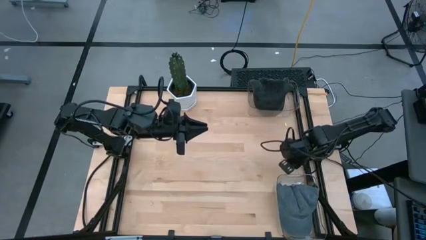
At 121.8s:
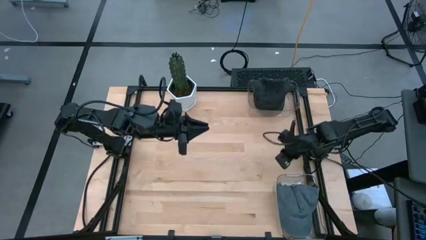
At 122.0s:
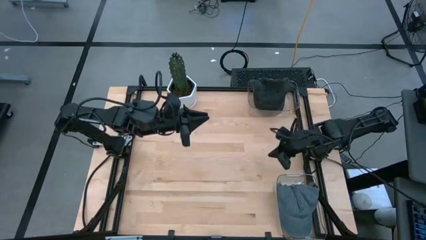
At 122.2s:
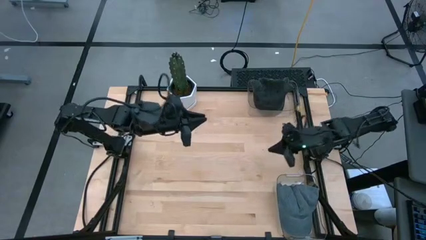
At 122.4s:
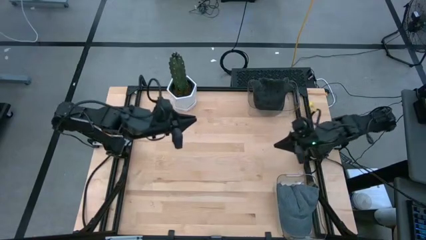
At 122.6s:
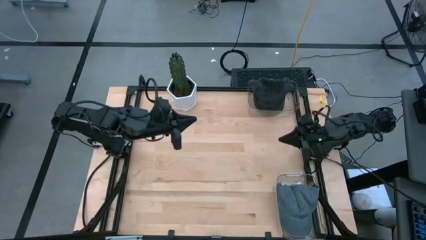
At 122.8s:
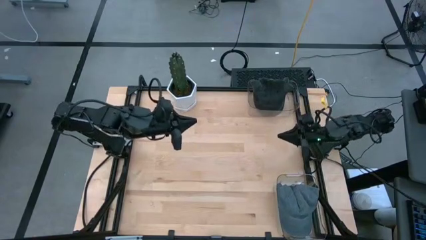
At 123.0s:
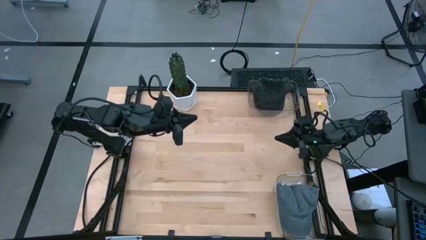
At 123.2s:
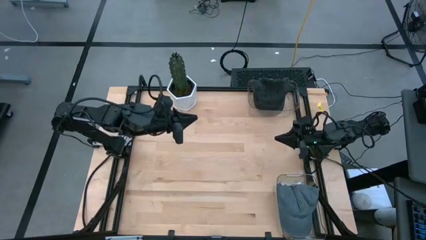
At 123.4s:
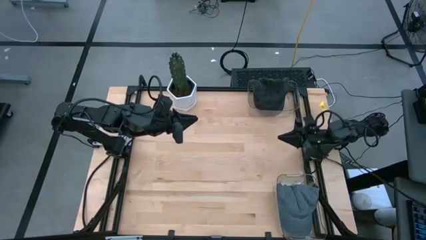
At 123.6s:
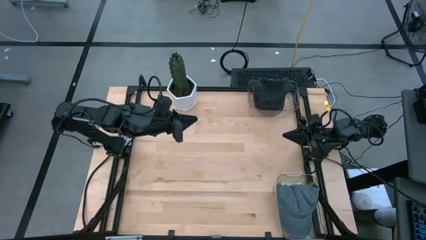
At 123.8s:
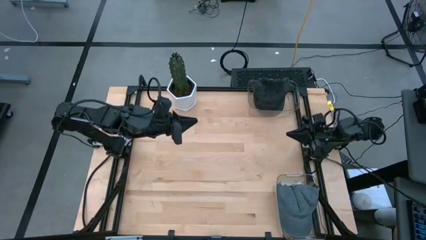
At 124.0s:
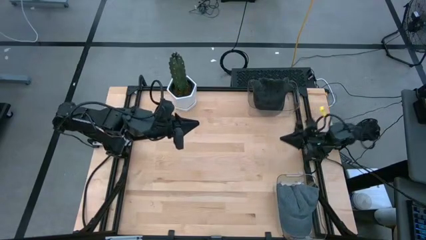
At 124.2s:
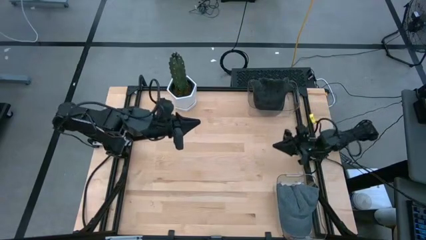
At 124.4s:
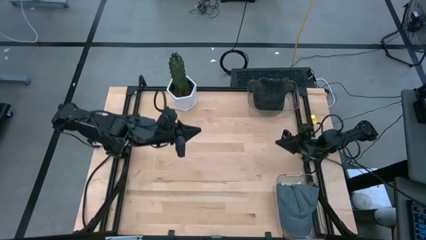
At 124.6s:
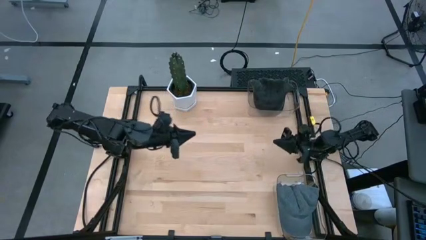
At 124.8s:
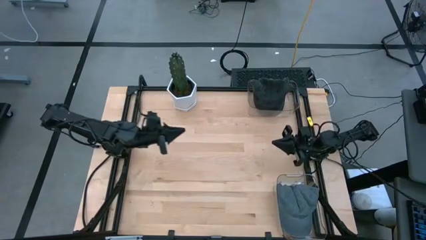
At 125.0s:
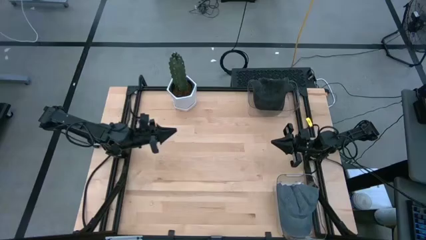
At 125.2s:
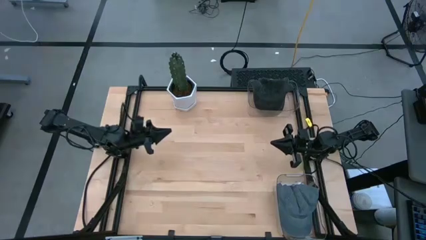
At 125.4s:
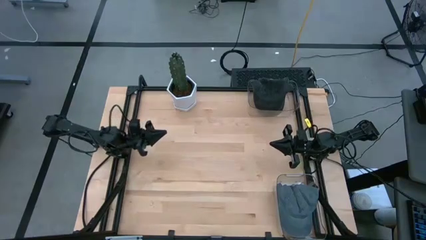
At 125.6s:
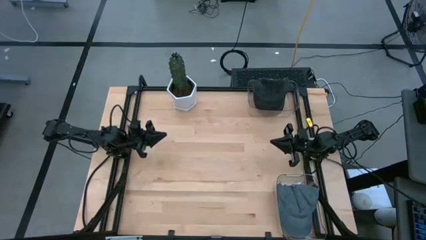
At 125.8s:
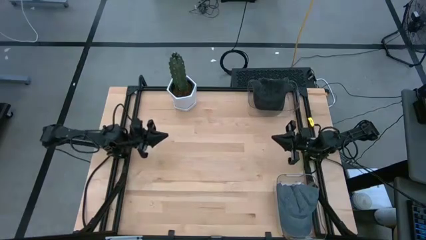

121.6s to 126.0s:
Task: Pick & Place hat
Return to Home Position

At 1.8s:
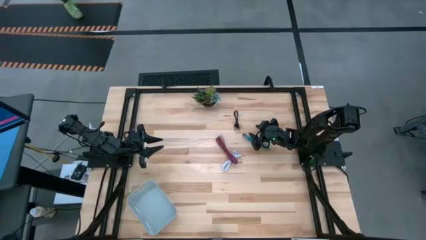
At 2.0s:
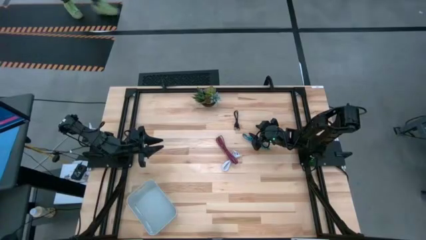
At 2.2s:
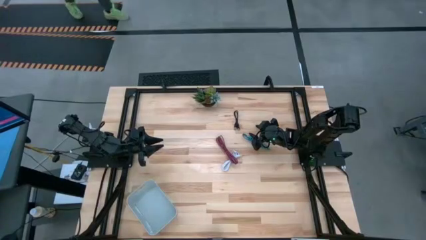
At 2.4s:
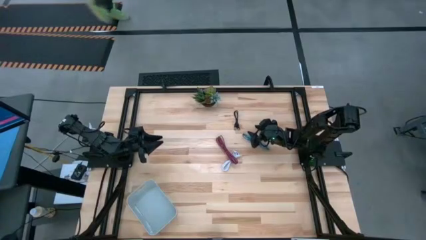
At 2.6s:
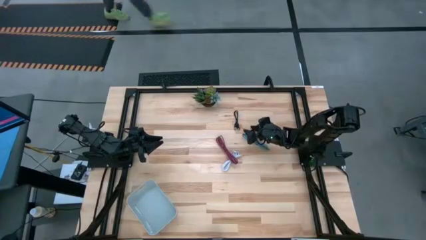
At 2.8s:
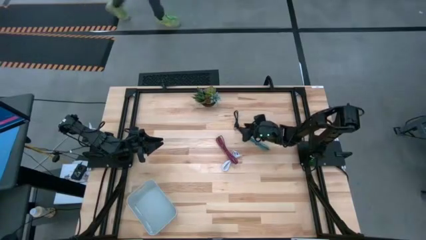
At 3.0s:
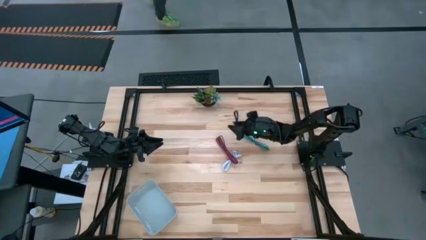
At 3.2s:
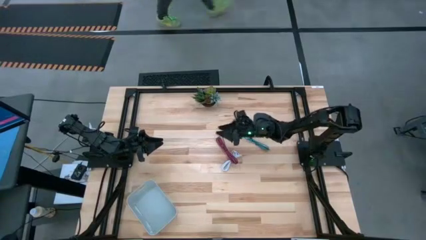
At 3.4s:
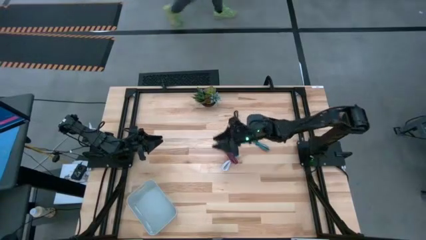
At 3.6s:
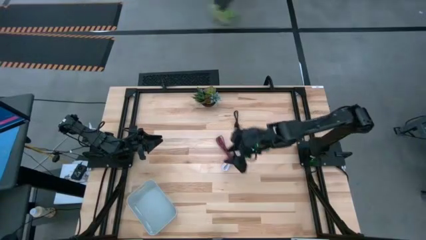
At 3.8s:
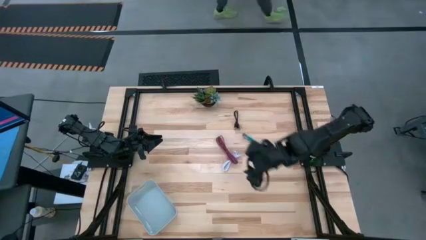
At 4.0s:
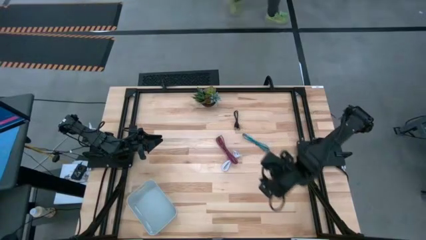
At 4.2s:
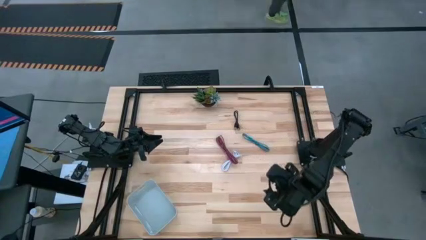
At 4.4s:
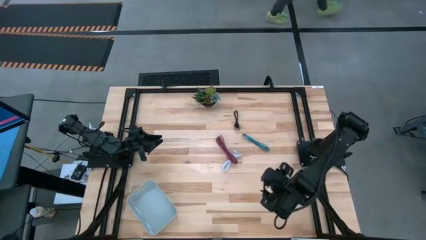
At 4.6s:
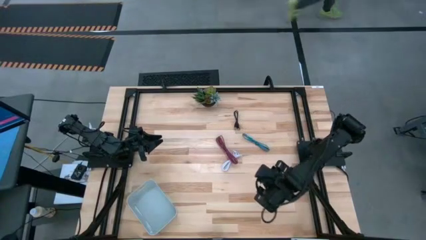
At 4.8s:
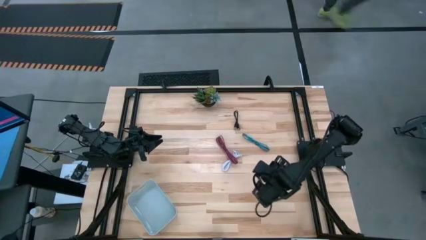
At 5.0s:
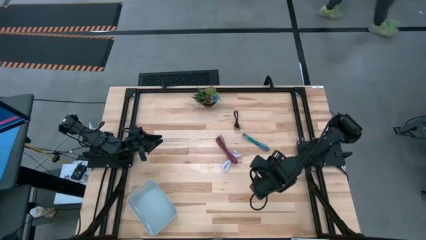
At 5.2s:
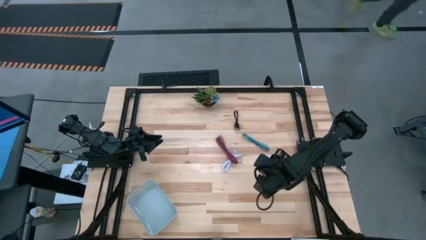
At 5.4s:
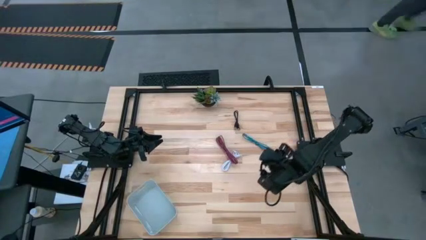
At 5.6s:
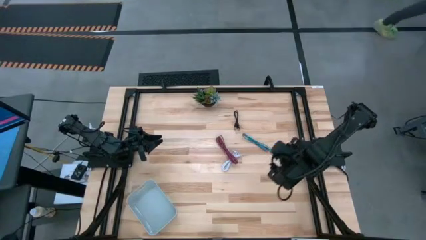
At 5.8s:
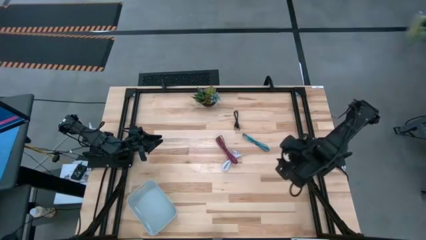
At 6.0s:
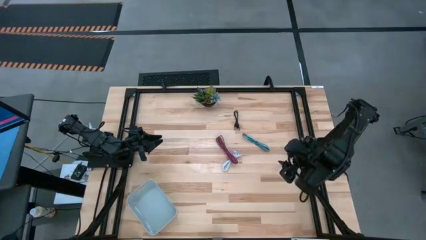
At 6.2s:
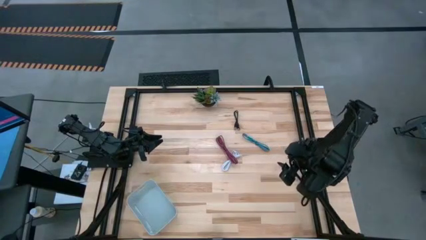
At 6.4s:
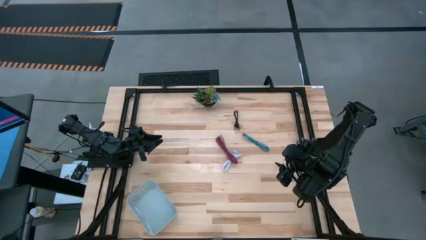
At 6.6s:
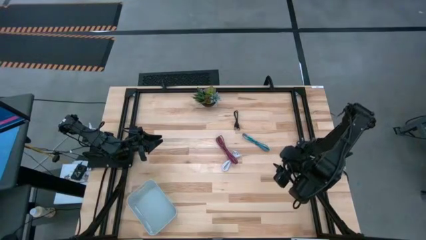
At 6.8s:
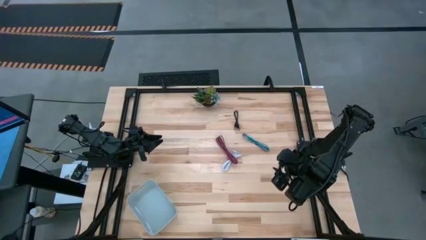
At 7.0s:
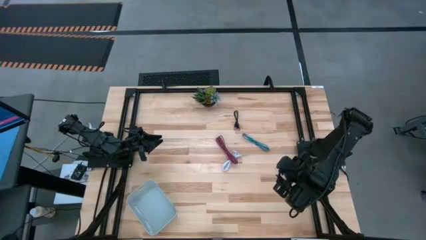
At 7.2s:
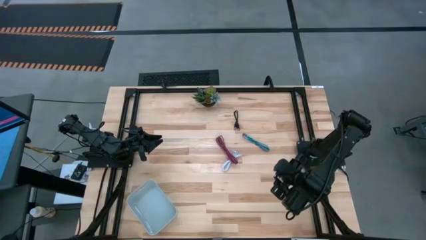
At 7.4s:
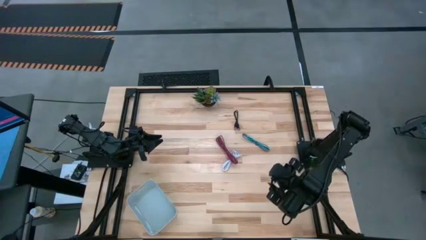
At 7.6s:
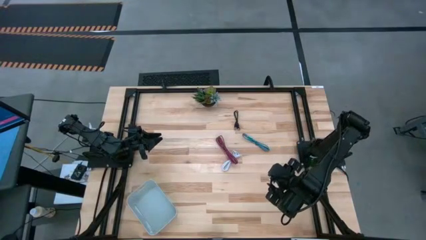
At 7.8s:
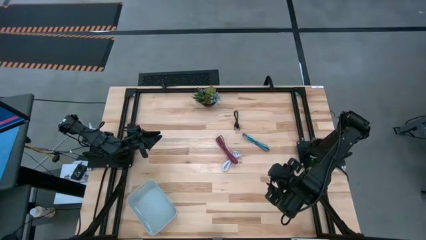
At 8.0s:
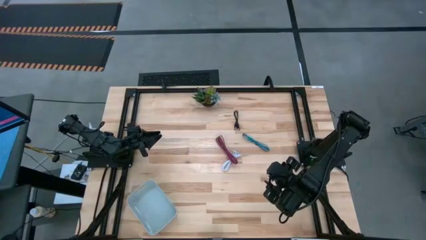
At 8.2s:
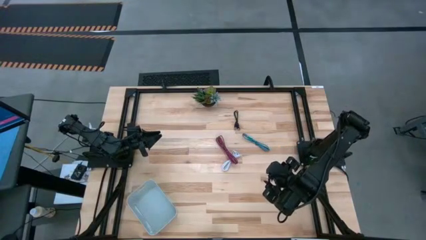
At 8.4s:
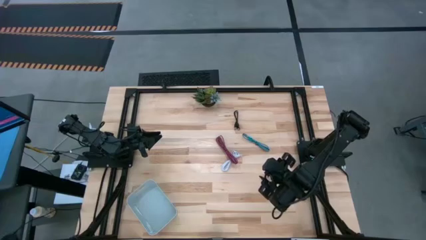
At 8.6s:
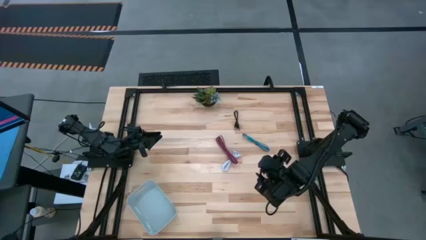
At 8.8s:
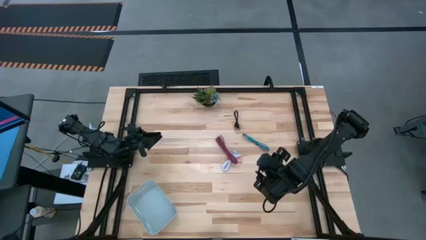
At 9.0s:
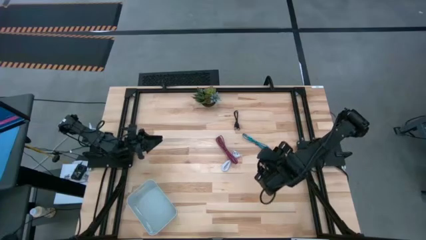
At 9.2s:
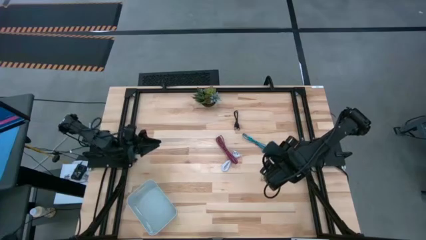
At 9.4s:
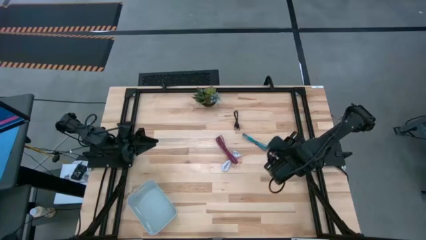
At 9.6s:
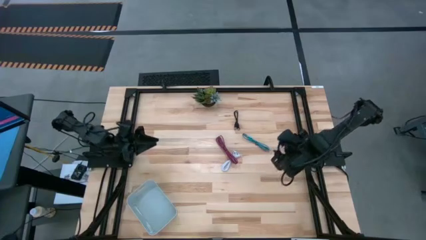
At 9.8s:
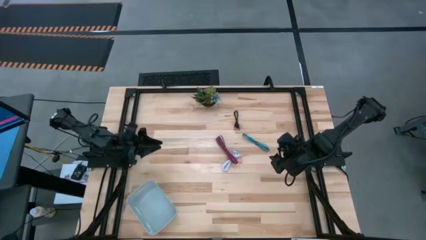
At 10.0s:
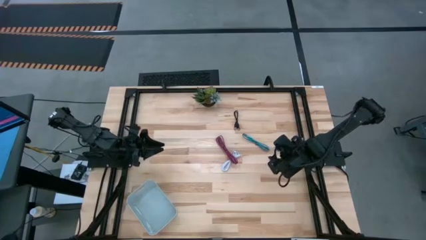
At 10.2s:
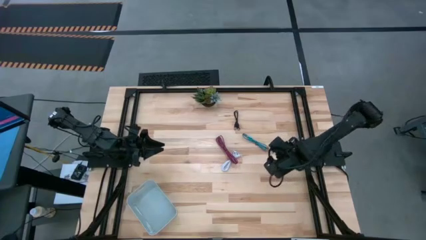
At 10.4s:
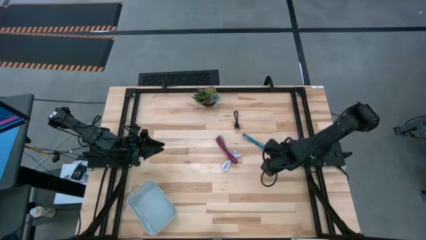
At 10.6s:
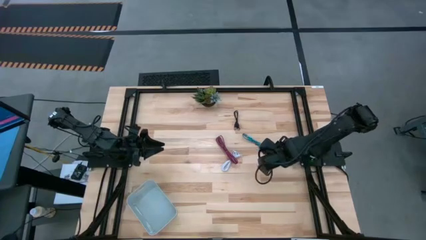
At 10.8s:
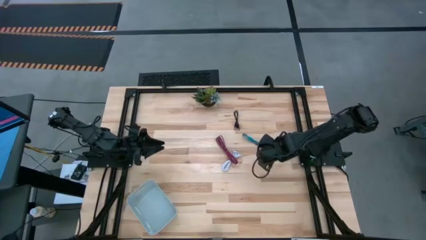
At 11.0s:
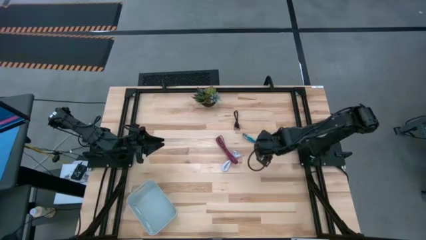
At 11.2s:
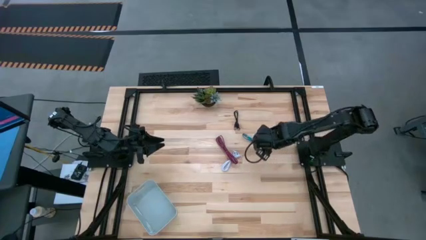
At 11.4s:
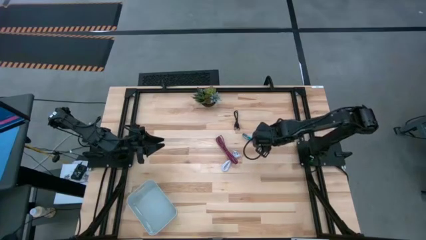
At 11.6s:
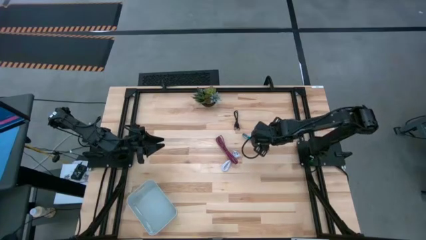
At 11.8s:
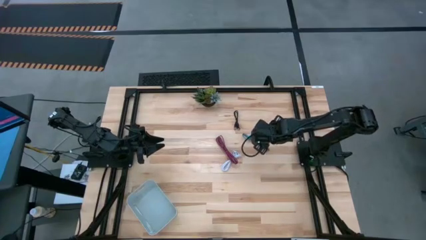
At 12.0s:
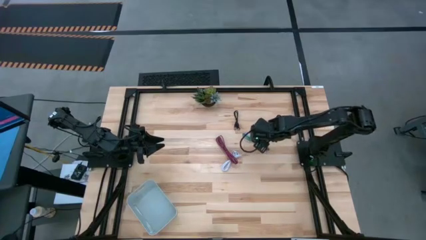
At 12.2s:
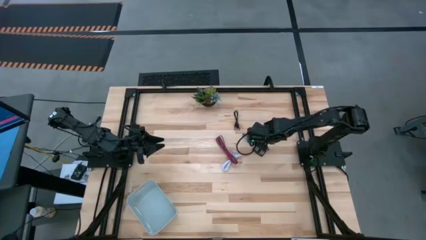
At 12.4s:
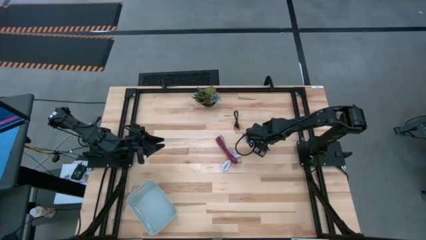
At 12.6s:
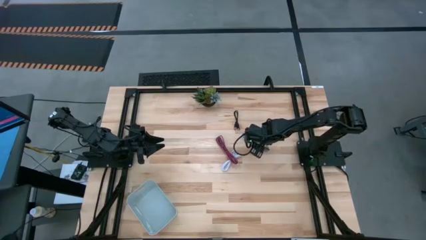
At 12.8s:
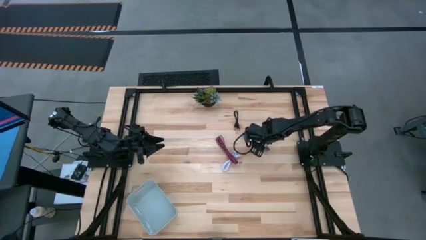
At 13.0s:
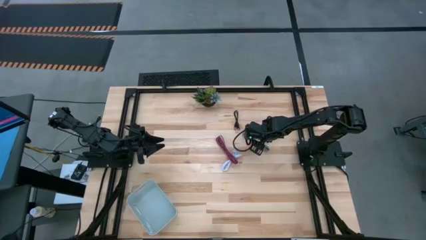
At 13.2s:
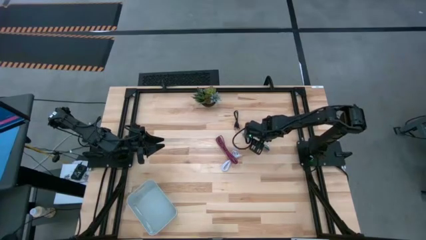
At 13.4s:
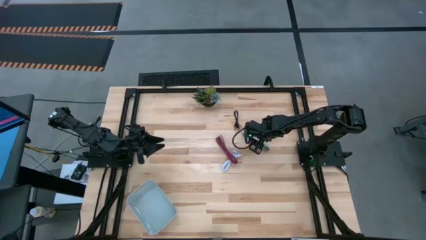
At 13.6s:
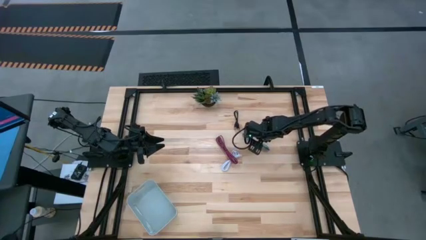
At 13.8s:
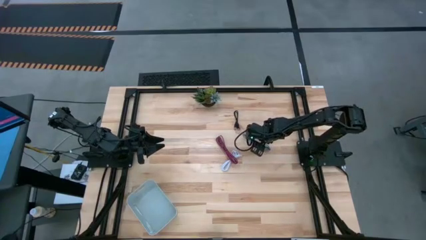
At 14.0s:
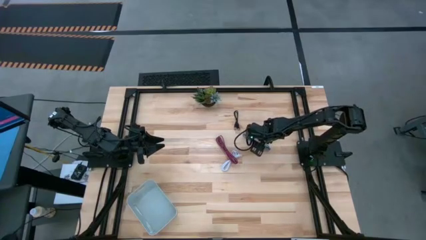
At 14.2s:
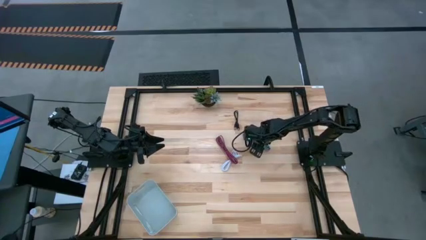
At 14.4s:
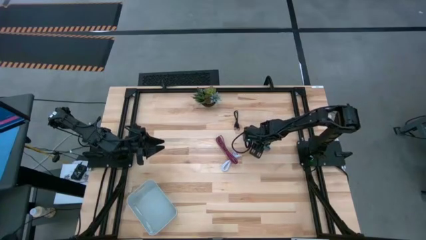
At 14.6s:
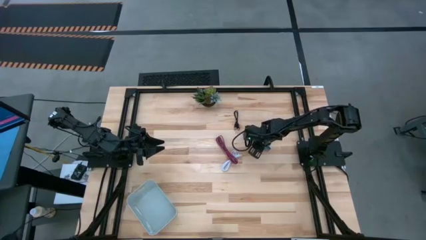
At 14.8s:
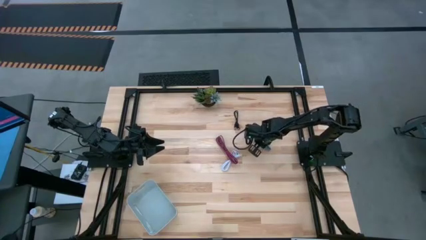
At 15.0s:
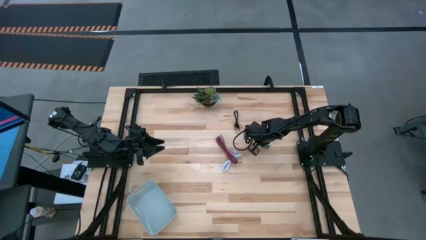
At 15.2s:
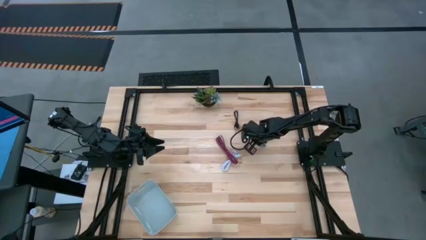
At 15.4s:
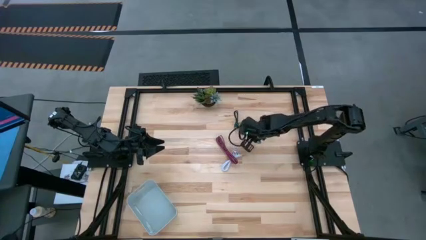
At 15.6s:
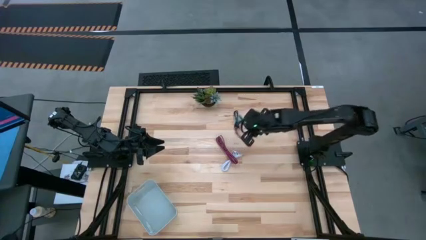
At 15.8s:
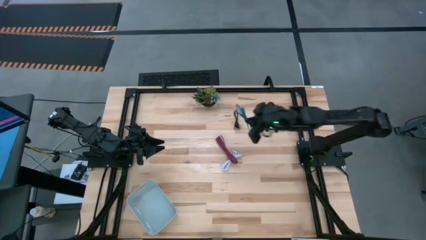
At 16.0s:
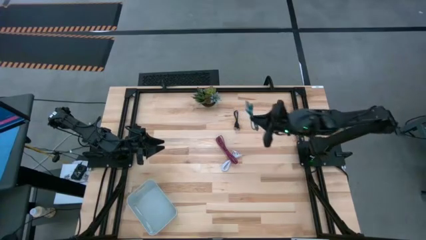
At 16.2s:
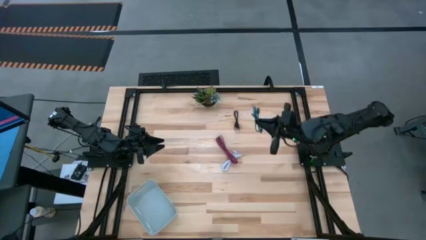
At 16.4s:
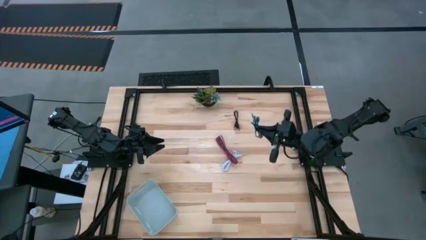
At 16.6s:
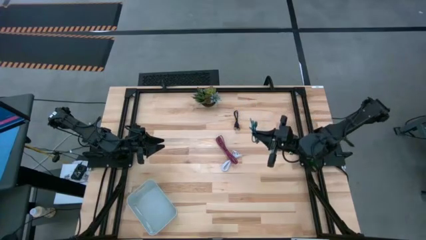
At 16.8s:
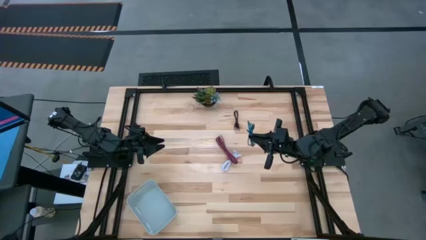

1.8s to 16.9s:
Task: Pick and place USB-C Cables
Put the blue charger cable into the gray bin
